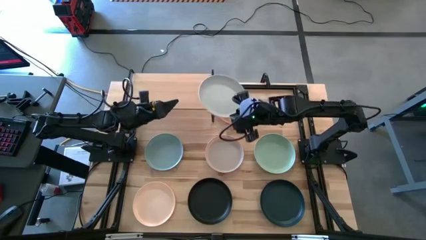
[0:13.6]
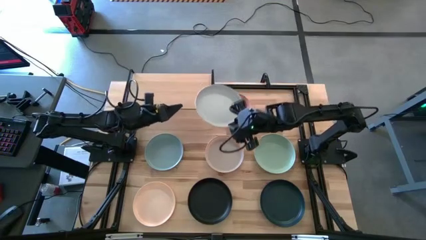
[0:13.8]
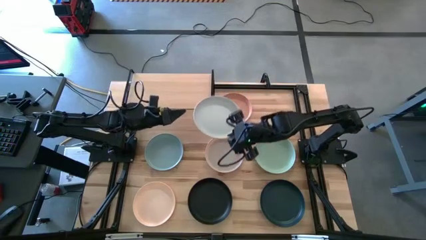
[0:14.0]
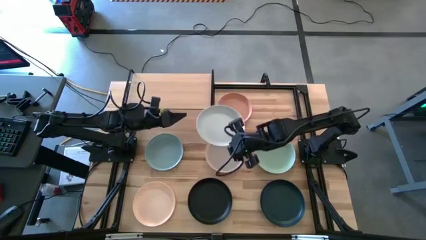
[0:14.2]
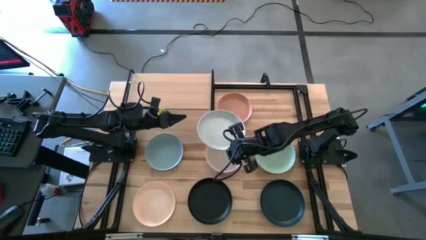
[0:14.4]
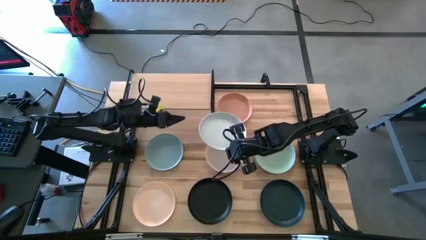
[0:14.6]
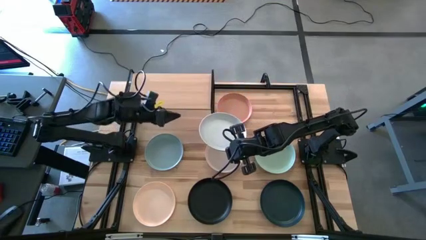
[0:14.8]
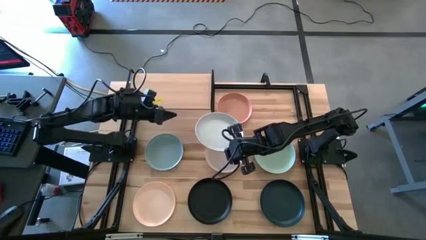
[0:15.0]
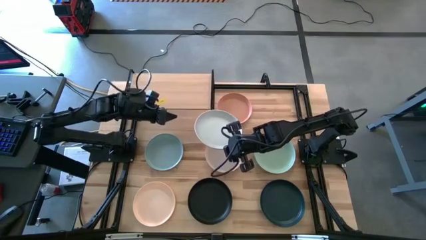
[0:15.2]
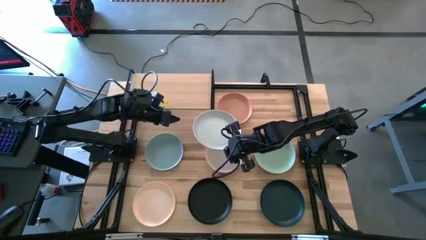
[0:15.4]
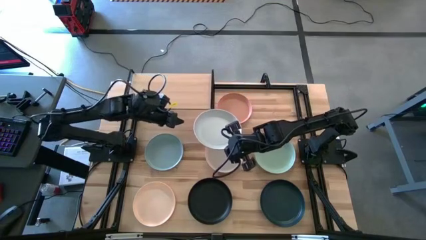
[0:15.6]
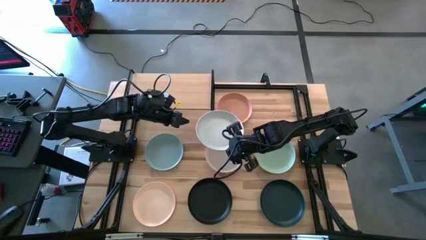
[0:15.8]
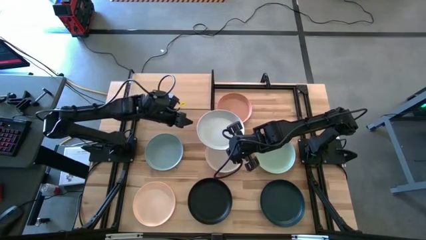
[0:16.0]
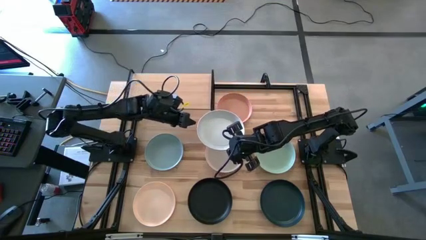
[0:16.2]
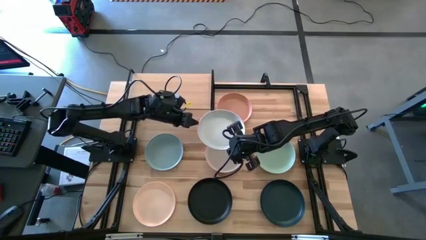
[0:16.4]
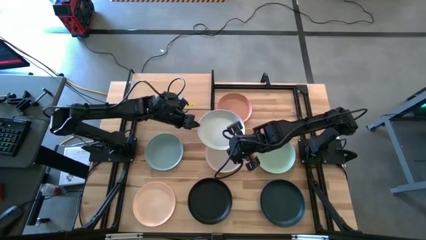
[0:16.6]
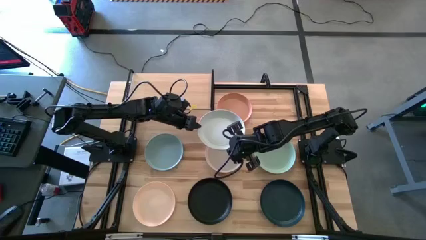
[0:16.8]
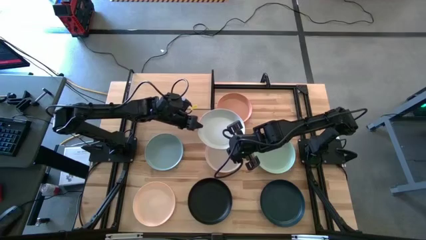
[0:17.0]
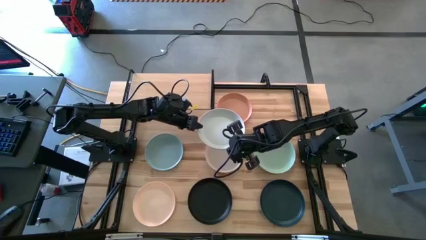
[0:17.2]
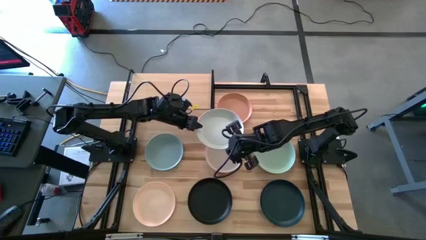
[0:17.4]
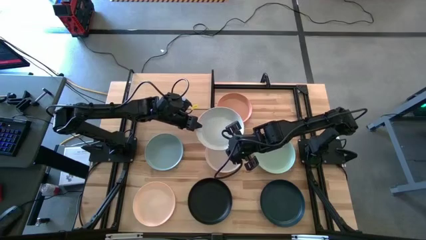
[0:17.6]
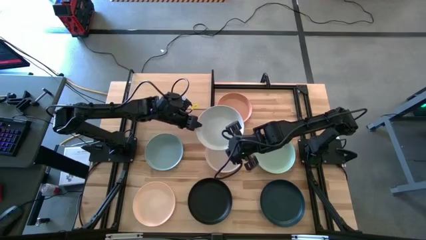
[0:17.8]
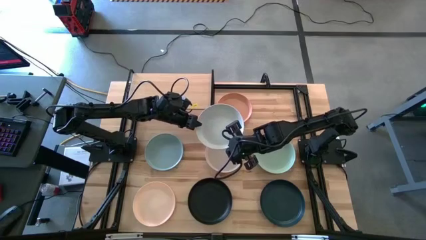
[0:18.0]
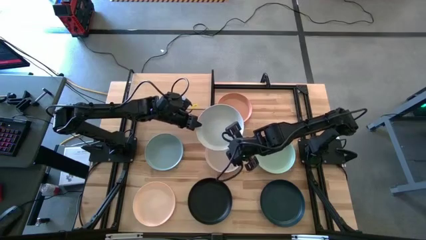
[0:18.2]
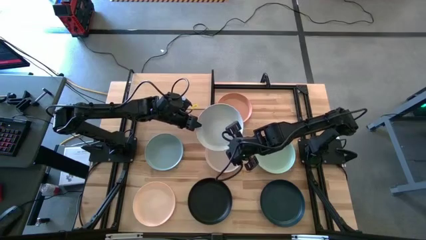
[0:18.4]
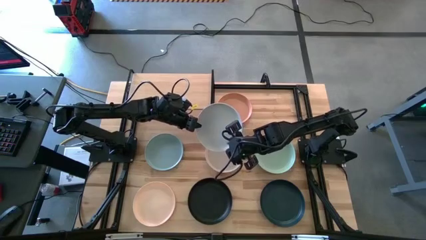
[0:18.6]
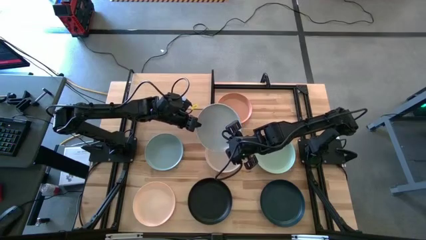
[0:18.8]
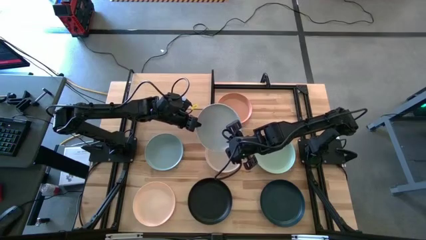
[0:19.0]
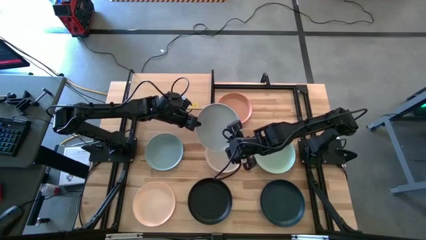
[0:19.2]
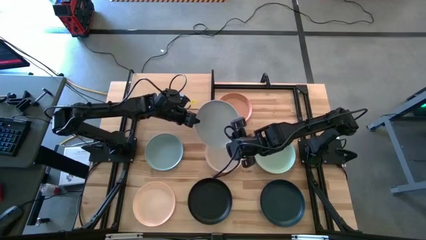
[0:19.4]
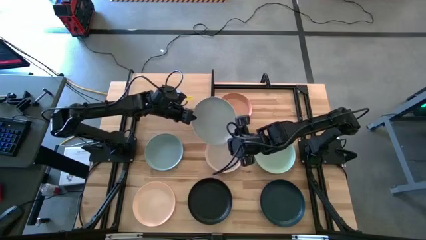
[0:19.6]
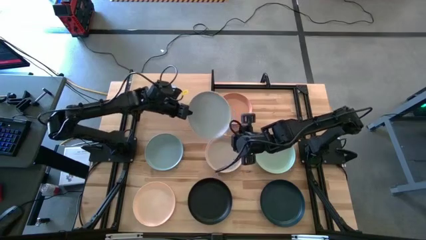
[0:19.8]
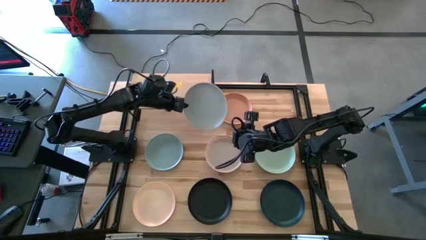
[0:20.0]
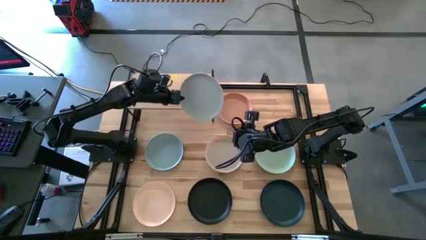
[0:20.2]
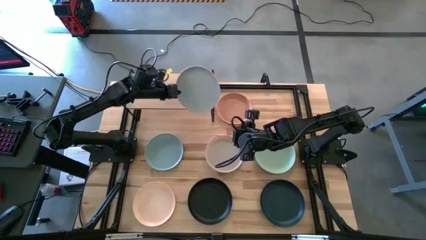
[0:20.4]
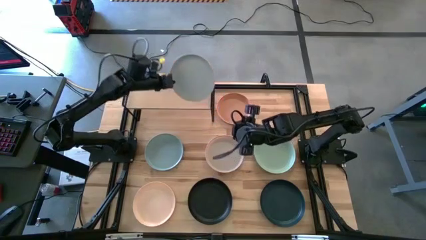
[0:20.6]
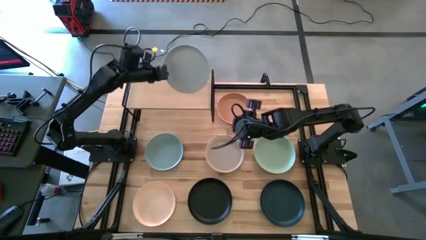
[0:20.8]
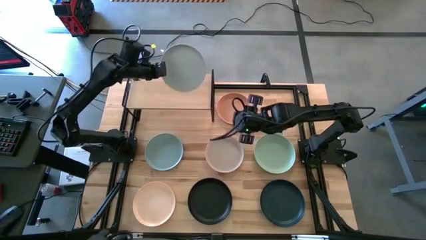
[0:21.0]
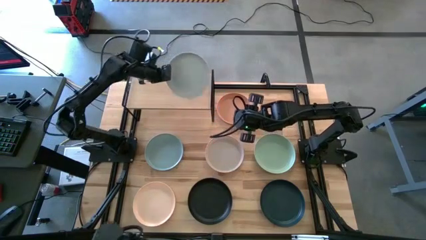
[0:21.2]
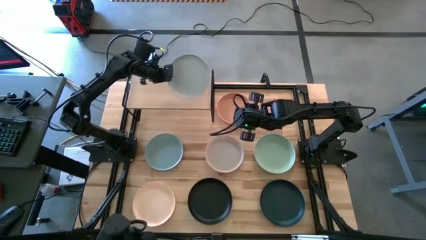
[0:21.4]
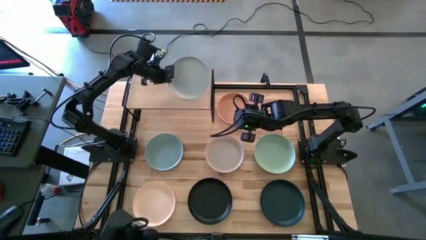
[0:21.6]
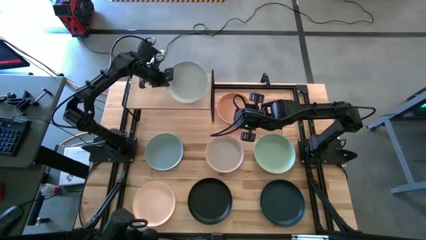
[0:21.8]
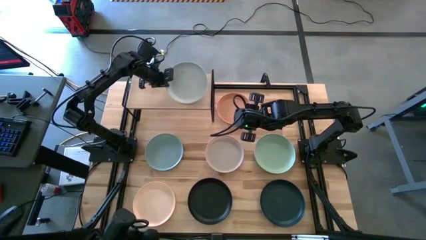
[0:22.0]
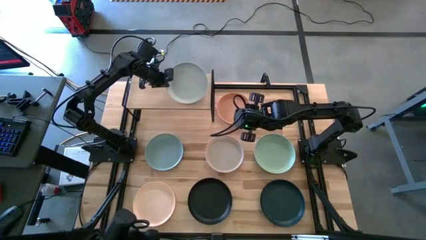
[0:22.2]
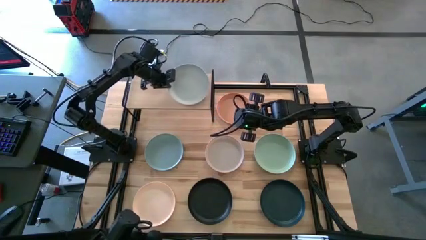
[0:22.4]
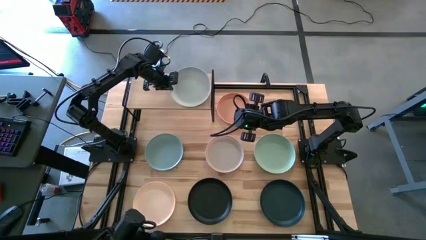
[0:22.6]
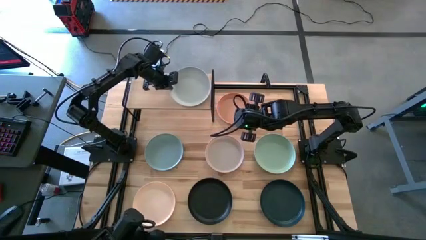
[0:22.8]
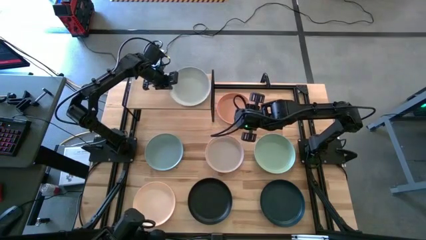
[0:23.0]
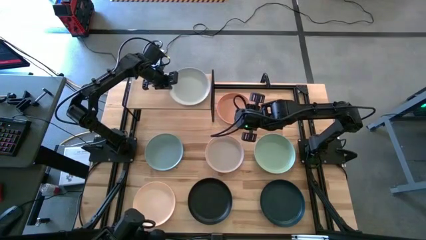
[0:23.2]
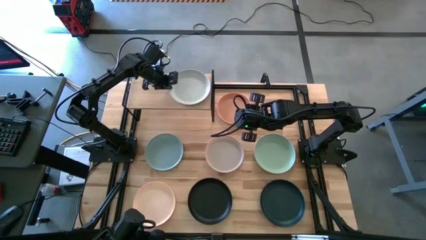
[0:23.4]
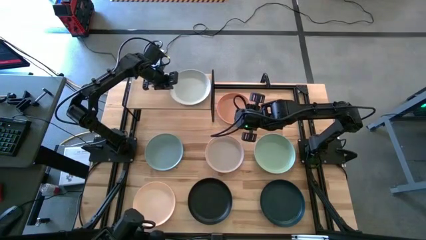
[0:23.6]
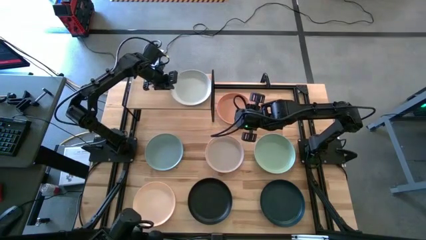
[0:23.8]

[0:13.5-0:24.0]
Task: Place and stack plates onto a shelf
Put the white plate on the shelf
